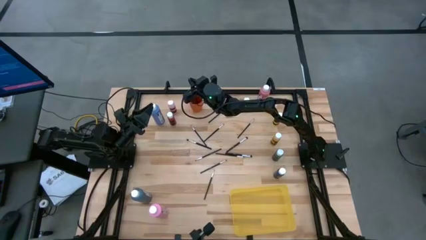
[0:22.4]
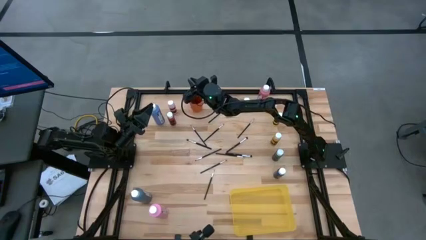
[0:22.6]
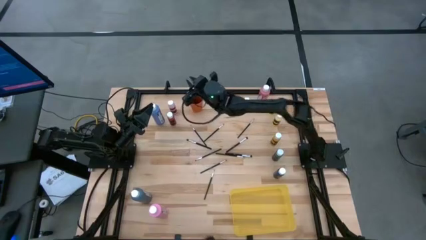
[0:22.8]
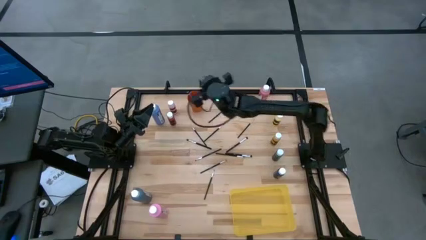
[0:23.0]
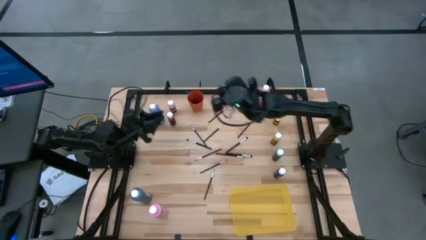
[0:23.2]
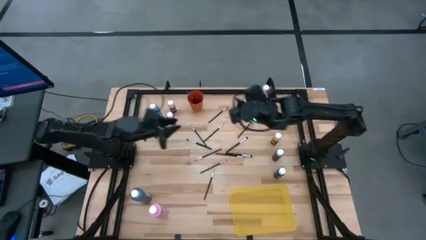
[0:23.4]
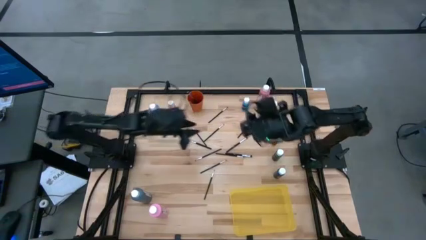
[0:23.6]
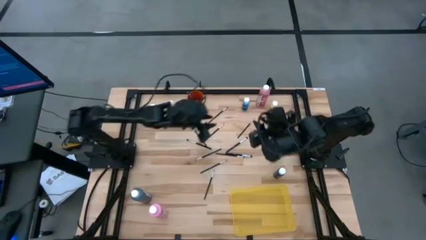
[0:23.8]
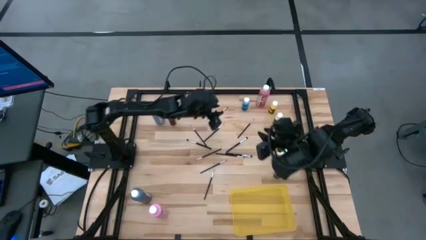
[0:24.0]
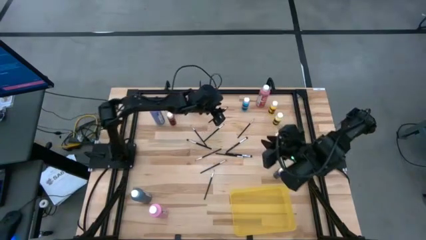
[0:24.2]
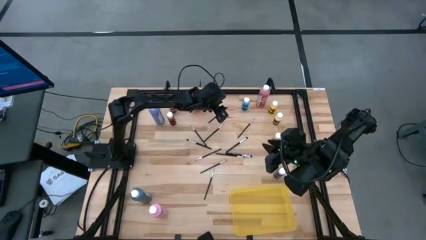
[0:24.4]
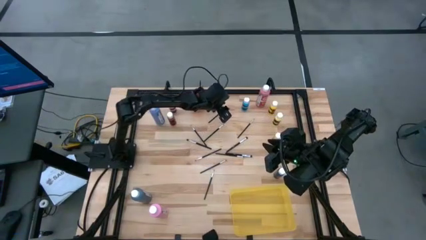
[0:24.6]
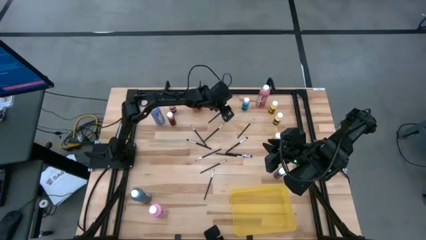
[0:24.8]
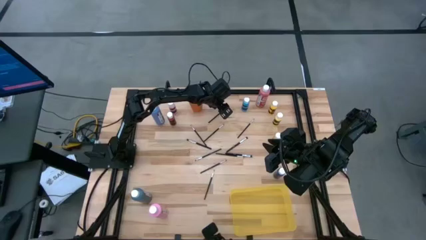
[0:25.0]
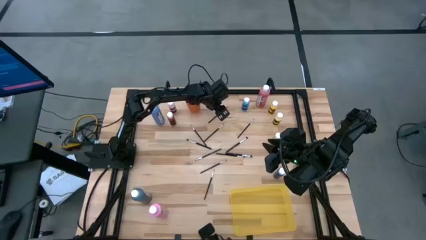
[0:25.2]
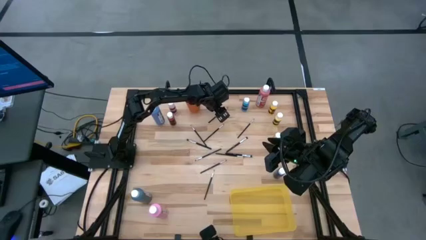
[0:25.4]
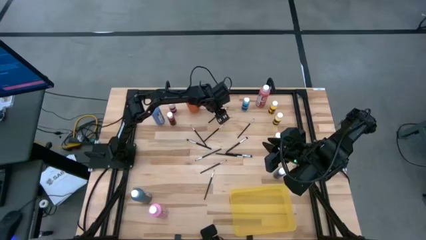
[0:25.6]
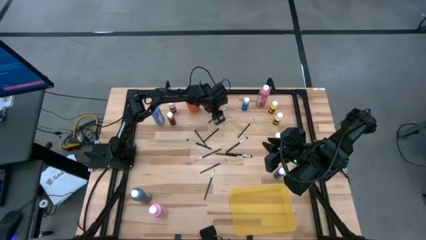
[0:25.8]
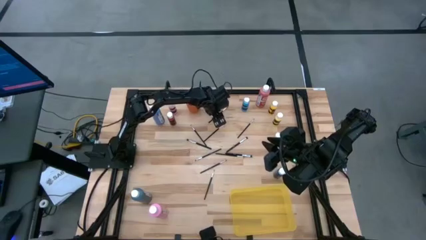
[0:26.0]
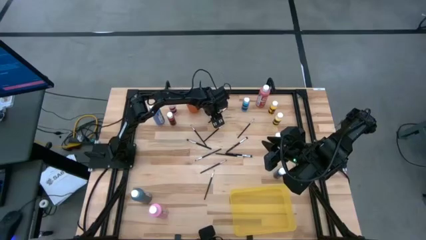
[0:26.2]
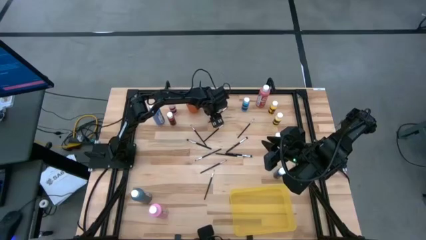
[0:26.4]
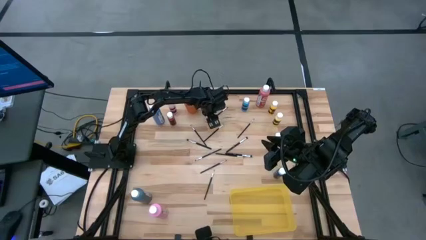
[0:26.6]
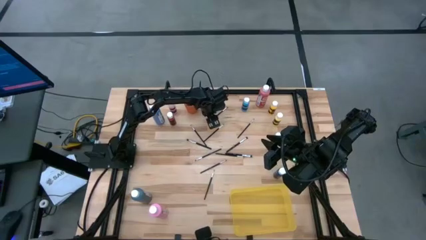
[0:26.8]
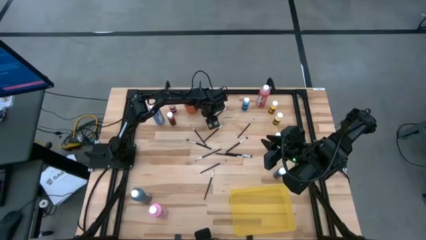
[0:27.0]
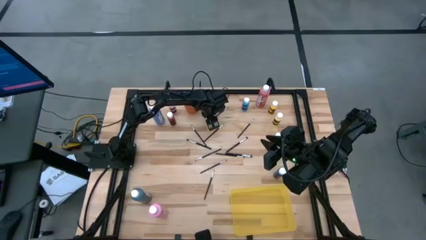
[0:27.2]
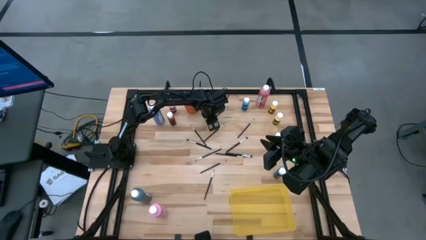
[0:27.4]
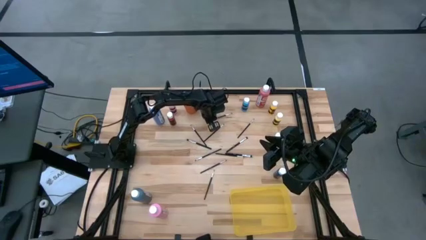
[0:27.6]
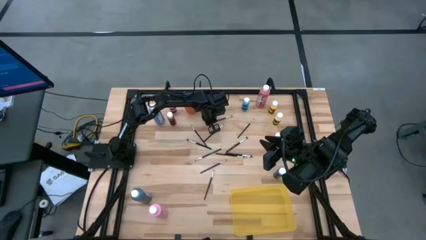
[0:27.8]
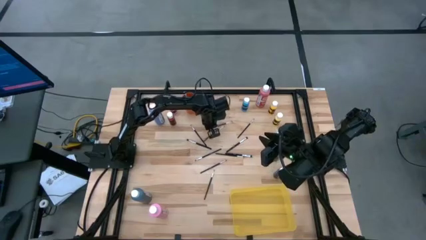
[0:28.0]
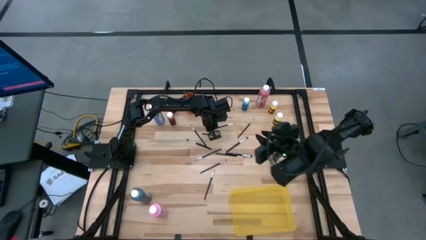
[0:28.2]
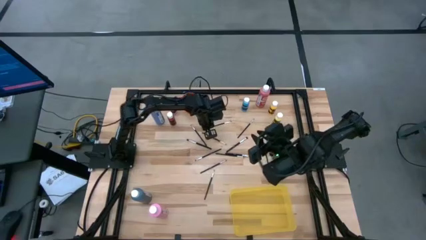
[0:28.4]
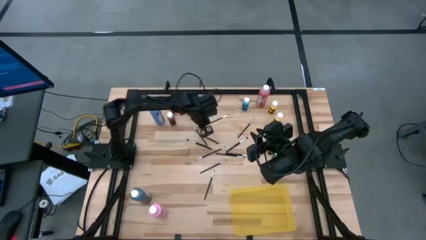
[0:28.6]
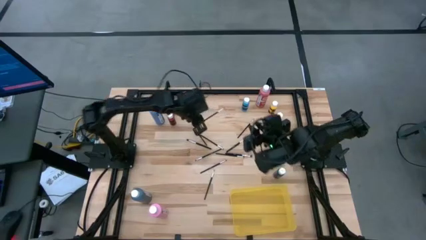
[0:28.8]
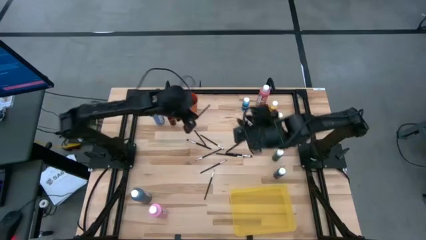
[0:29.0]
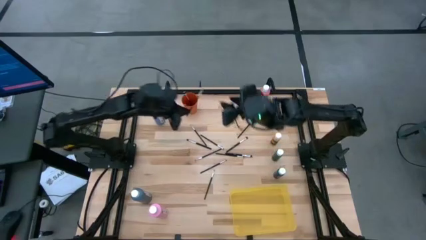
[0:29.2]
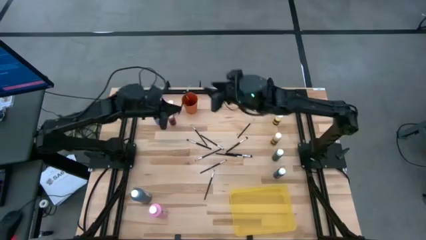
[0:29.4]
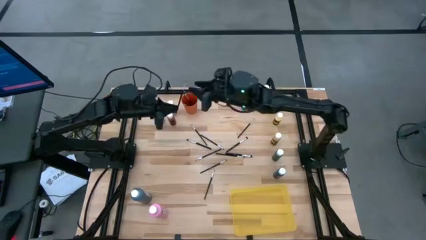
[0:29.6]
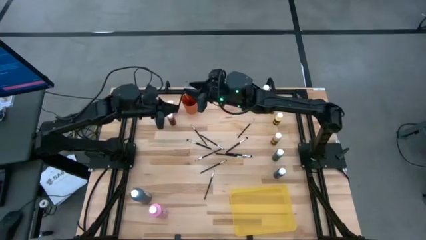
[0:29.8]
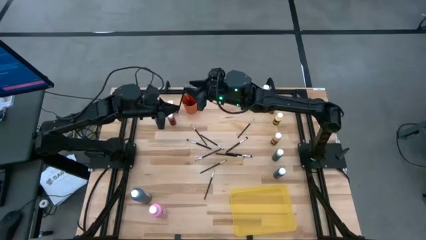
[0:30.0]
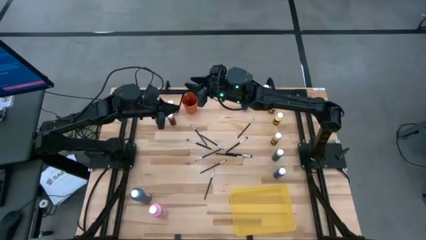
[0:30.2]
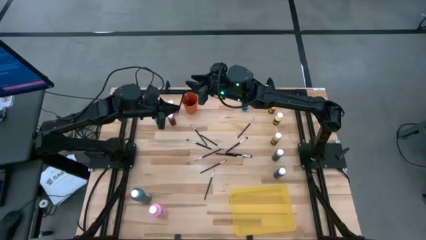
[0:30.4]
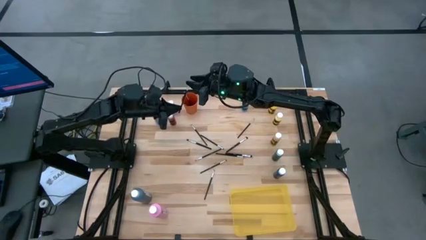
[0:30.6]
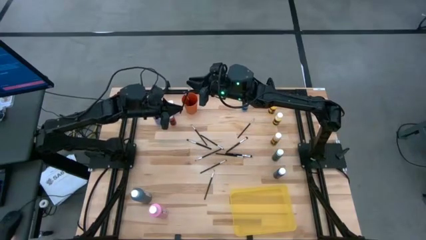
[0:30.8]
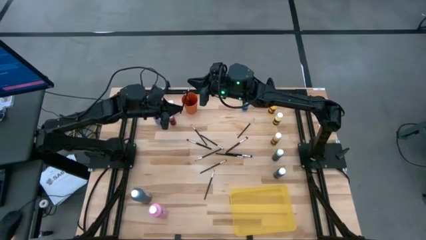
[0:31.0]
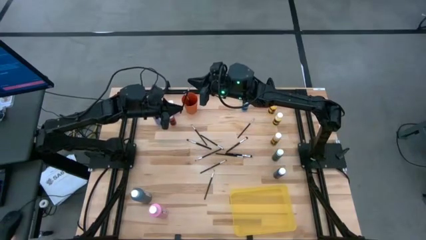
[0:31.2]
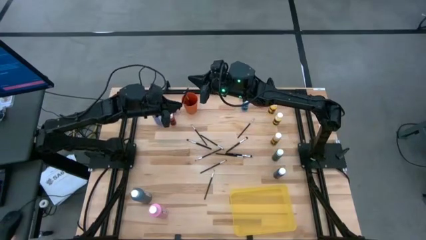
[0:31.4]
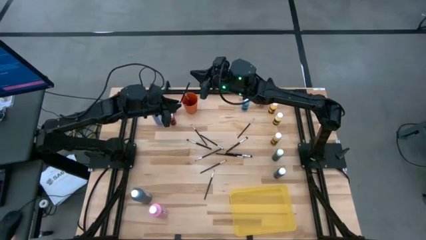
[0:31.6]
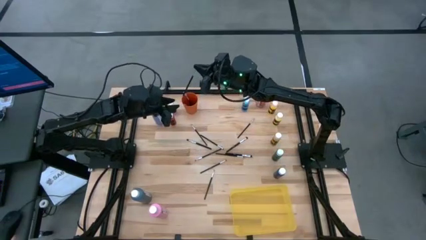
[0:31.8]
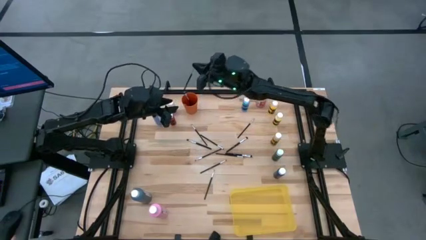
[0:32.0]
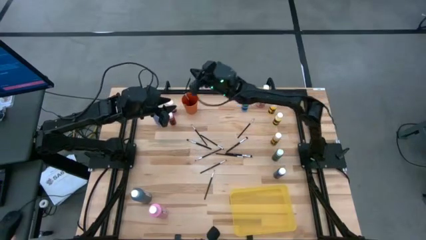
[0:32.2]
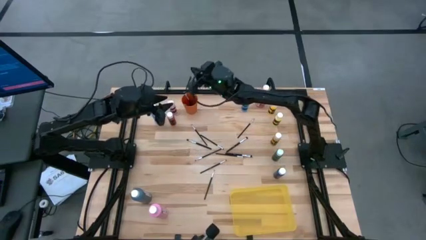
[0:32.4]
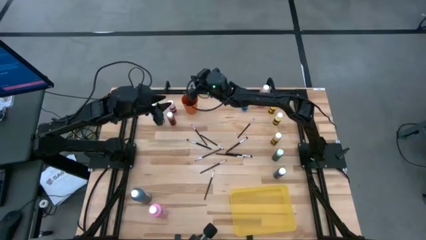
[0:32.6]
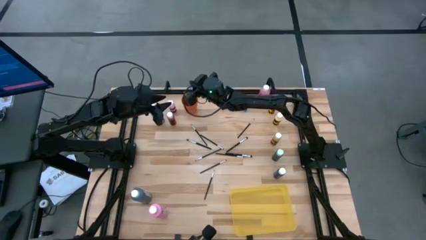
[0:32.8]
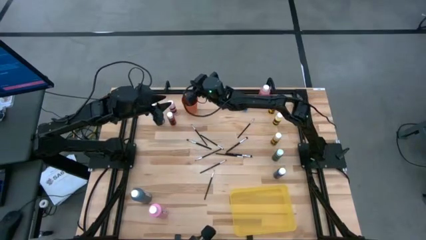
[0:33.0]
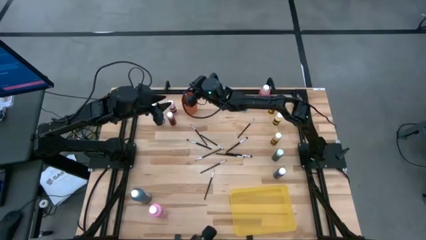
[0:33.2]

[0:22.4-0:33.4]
Task: Pick & Place Paint Supplies
Put the black paint brush into the orange cup

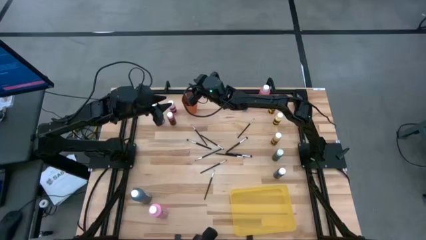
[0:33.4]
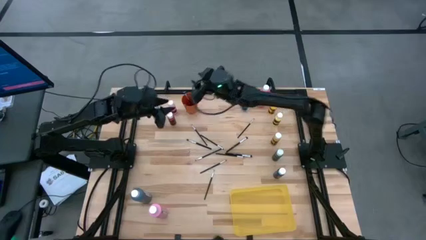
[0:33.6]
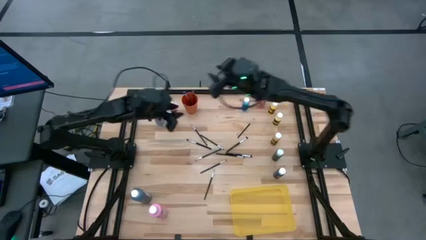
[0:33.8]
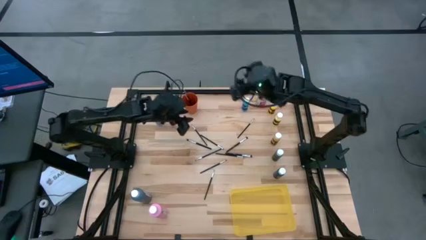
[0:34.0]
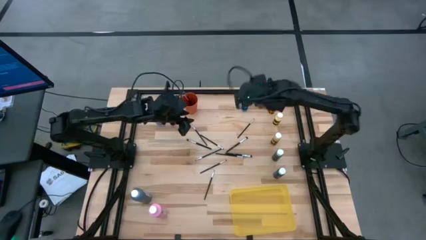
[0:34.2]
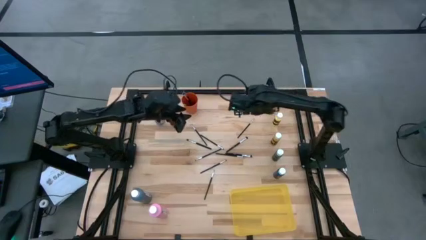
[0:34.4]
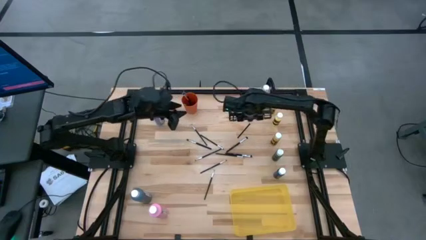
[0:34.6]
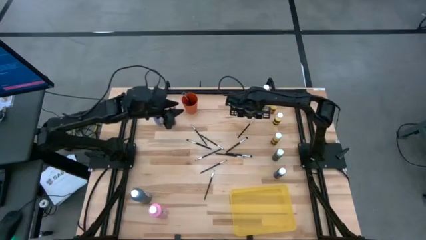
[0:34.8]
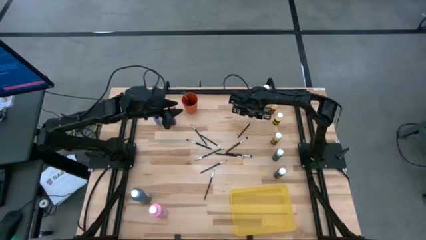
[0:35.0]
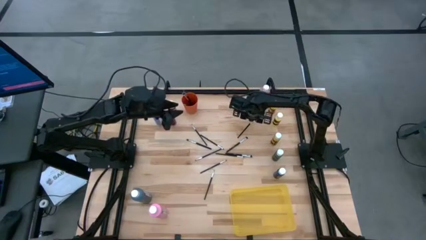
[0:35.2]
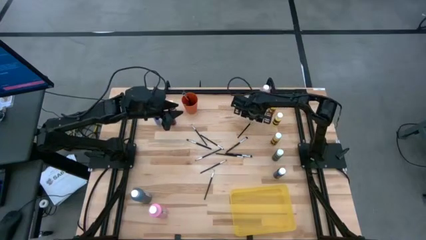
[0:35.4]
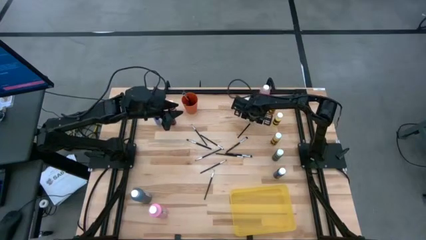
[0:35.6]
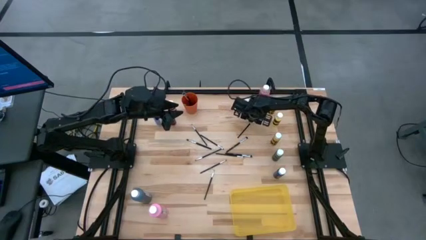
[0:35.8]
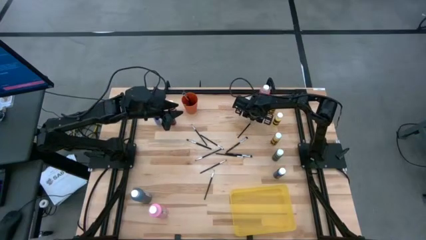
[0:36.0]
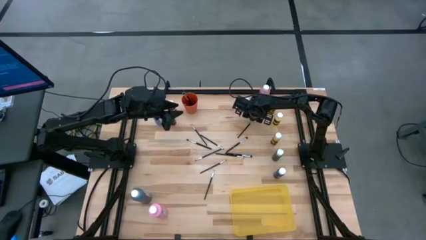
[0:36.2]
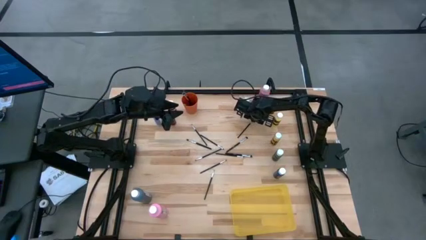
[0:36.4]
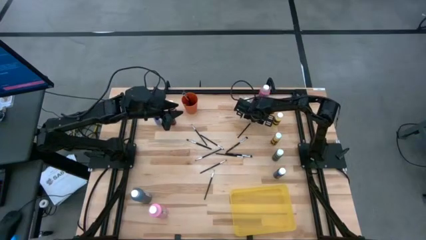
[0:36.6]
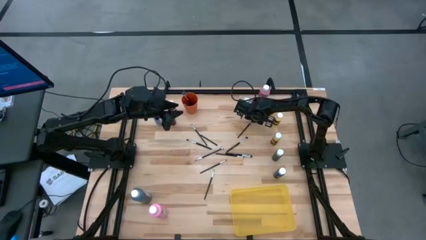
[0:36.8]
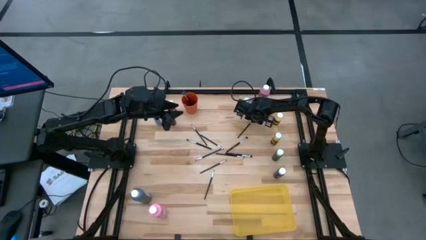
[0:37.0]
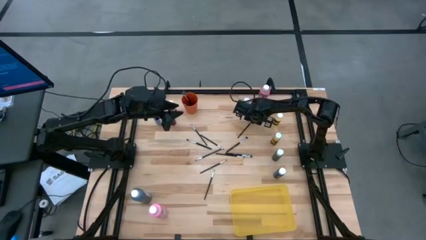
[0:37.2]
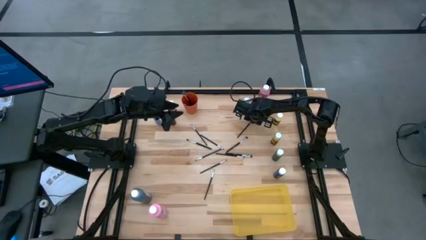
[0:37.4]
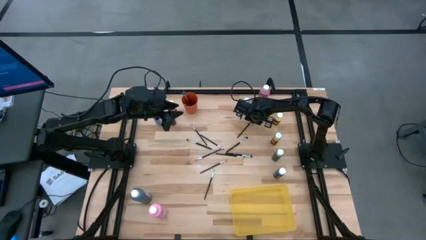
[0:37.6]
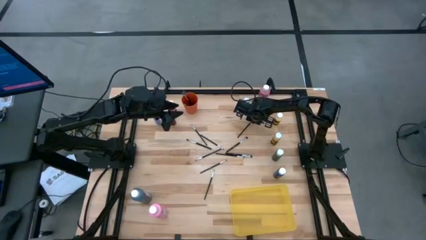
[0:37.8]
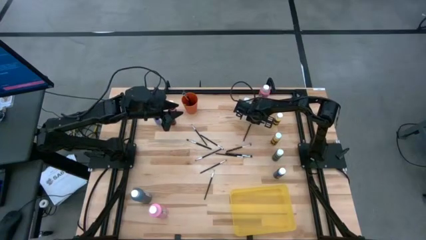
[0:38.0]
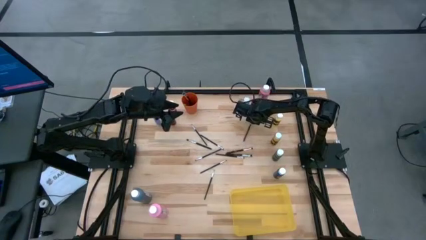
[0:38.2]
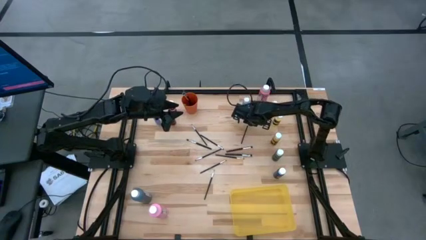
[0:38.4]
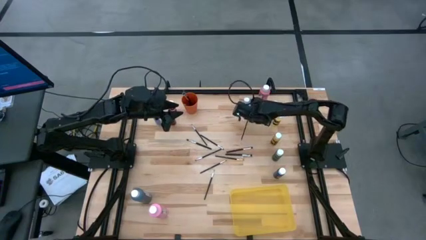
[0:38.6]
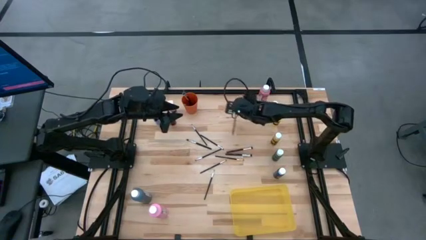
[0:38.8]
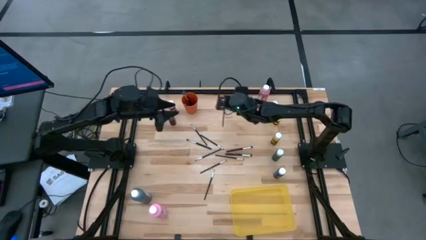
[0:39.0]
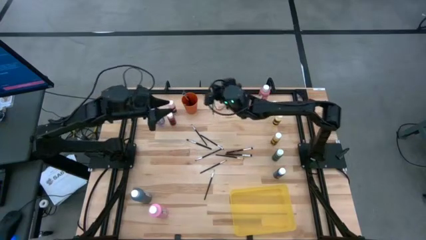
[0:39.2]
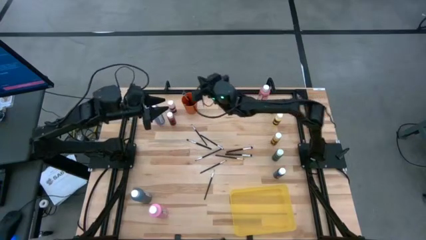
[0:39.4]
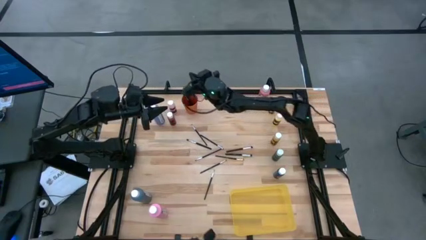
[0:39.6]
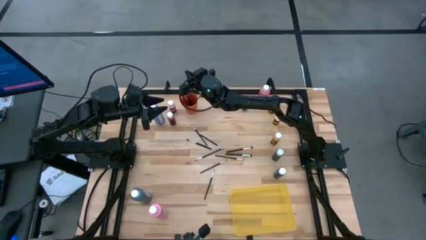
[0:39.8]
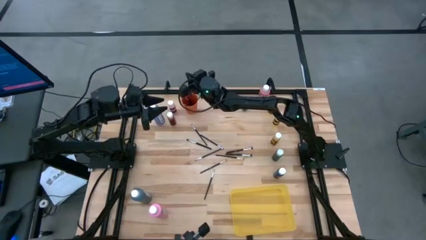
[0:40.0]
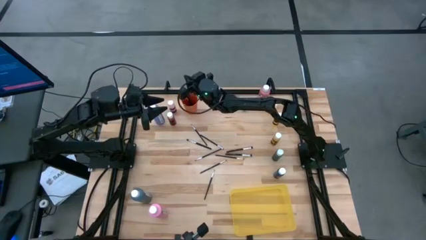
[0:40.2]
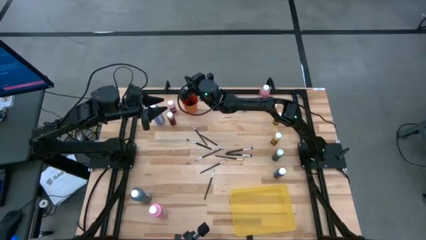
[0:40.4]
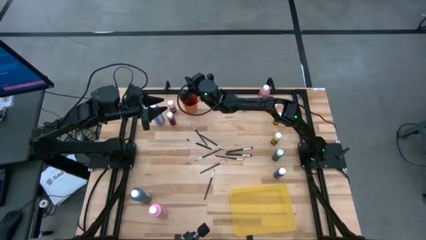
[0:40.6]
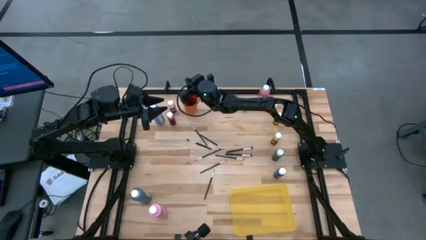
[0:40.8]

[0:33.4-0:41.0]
Put the black paint brush into the orange cup
